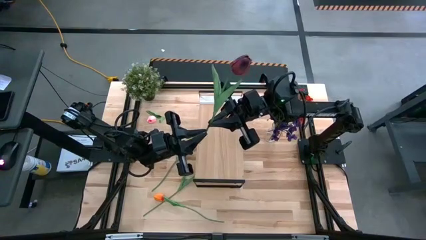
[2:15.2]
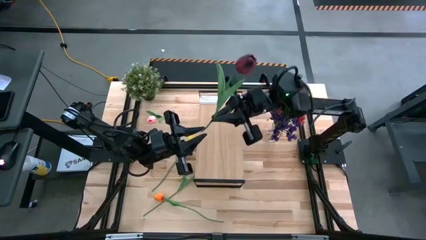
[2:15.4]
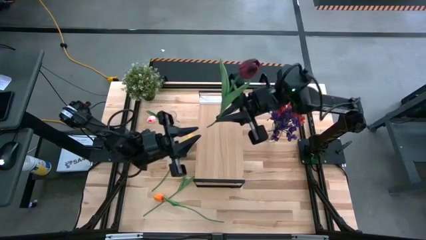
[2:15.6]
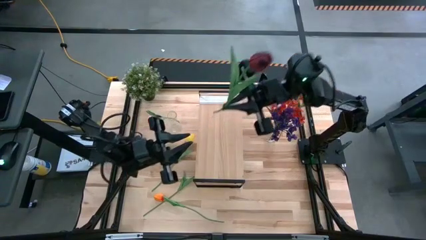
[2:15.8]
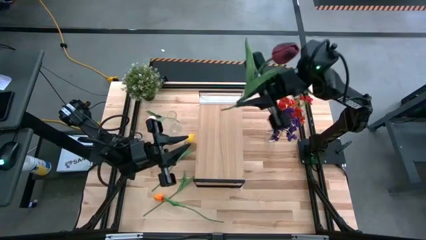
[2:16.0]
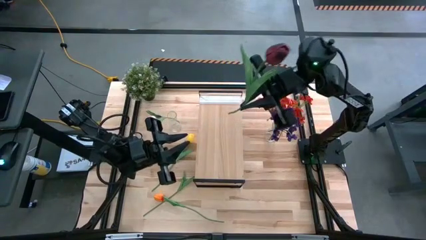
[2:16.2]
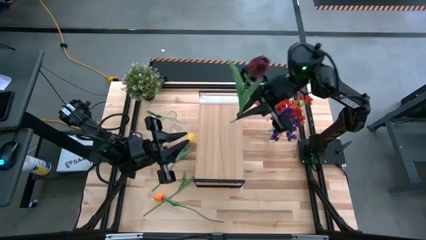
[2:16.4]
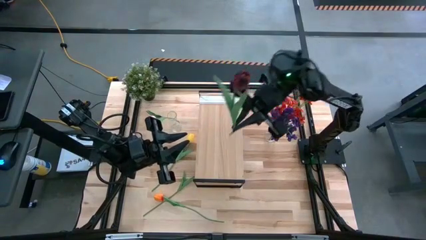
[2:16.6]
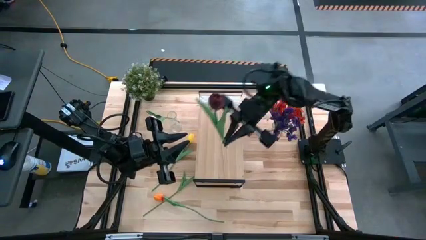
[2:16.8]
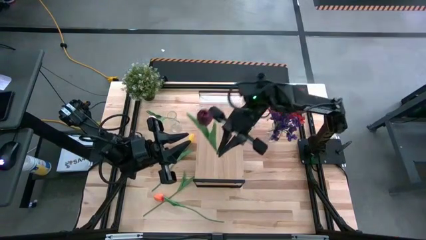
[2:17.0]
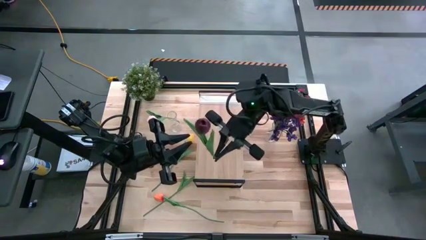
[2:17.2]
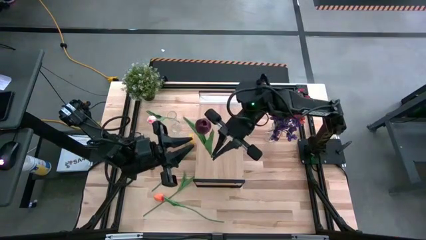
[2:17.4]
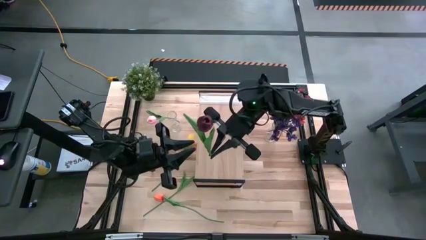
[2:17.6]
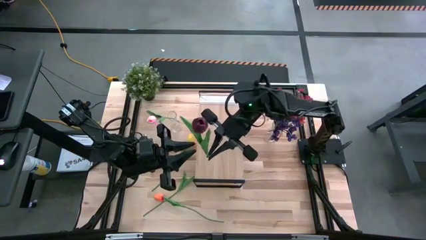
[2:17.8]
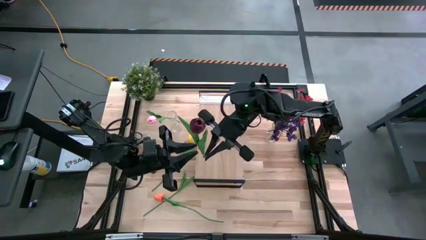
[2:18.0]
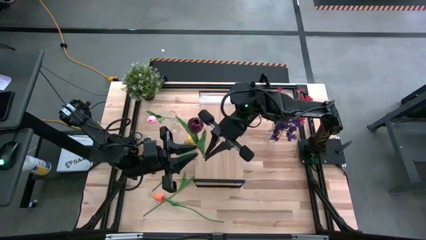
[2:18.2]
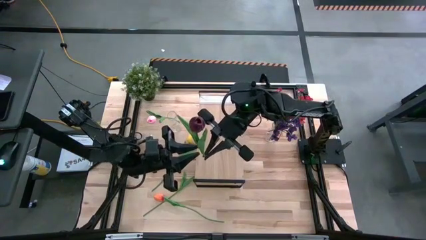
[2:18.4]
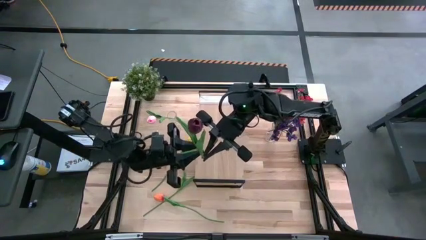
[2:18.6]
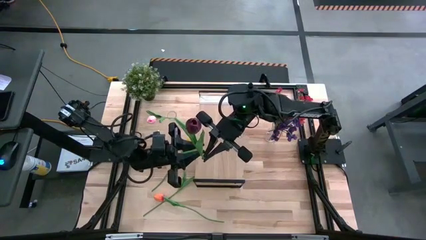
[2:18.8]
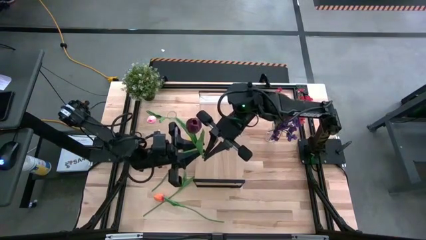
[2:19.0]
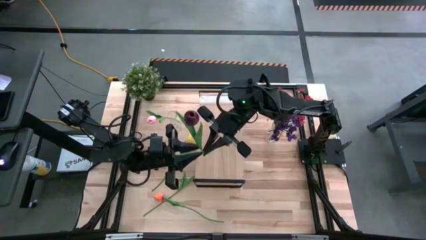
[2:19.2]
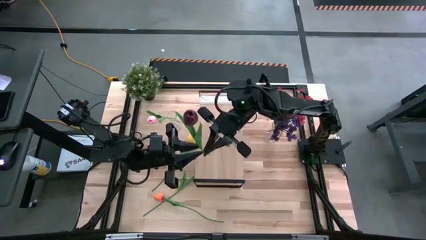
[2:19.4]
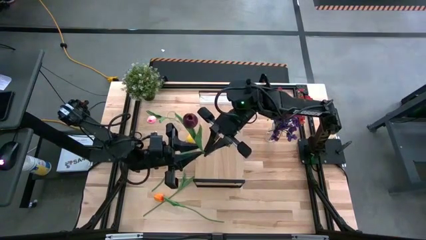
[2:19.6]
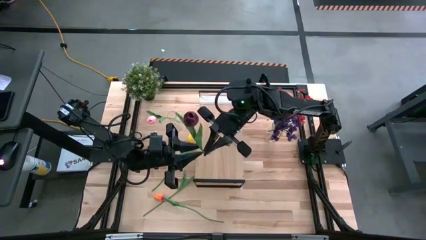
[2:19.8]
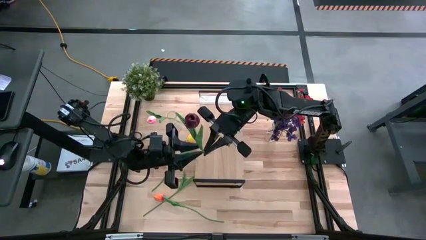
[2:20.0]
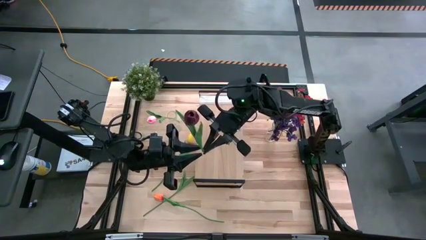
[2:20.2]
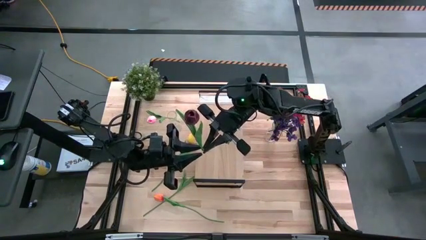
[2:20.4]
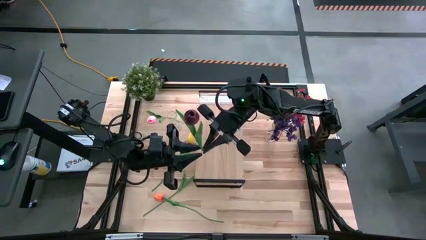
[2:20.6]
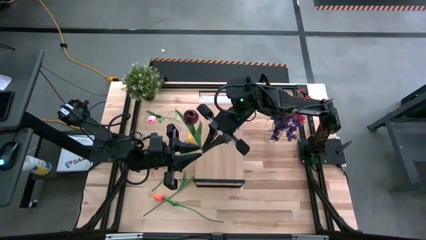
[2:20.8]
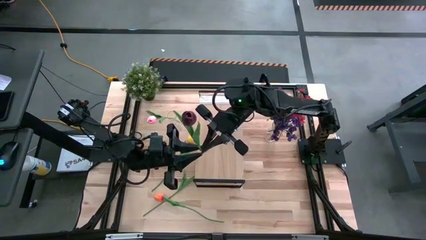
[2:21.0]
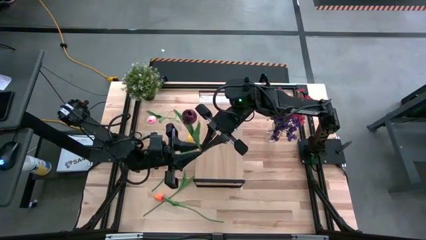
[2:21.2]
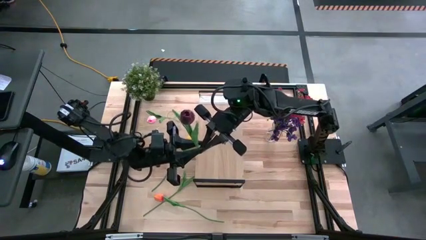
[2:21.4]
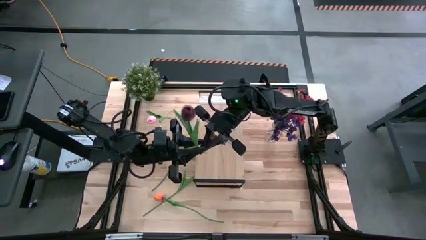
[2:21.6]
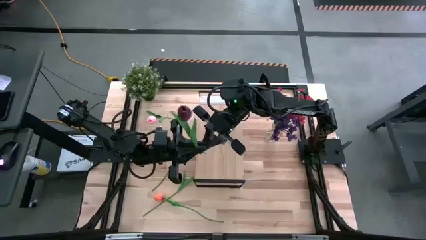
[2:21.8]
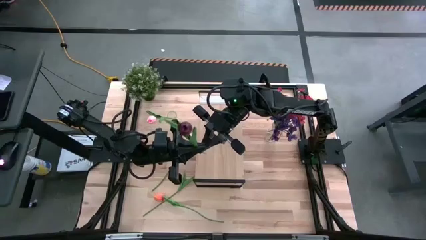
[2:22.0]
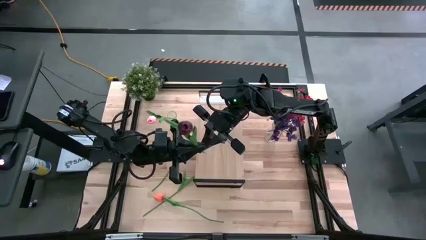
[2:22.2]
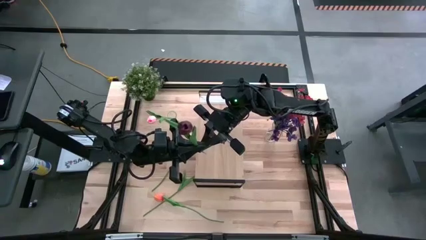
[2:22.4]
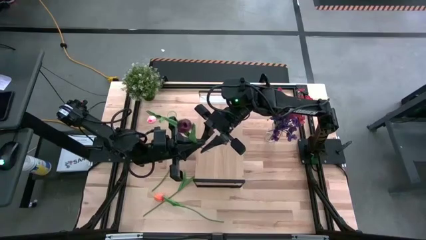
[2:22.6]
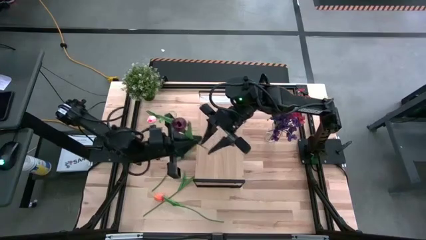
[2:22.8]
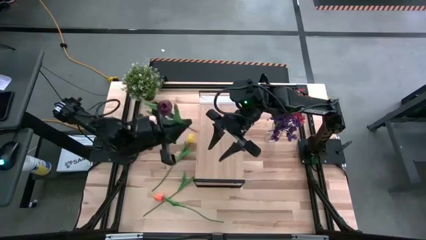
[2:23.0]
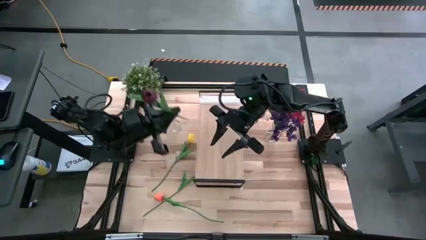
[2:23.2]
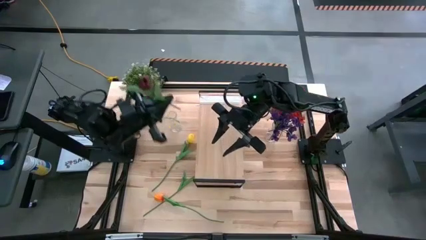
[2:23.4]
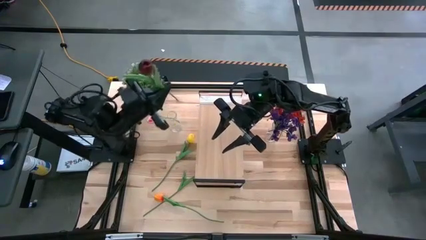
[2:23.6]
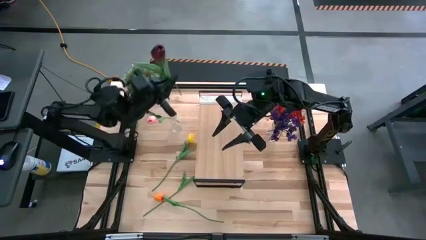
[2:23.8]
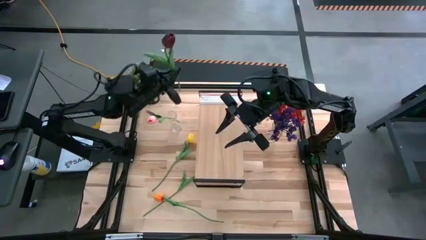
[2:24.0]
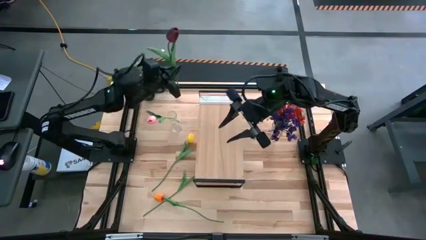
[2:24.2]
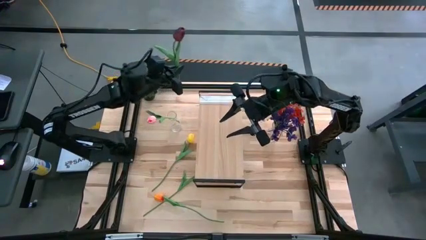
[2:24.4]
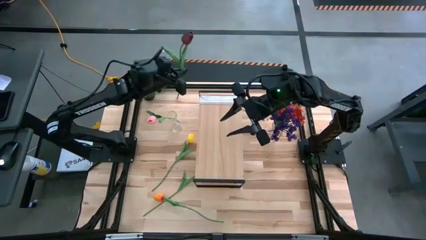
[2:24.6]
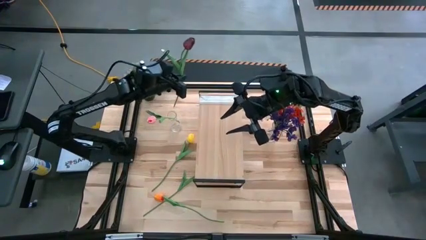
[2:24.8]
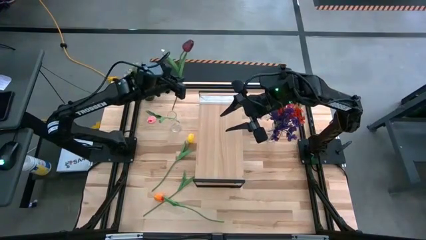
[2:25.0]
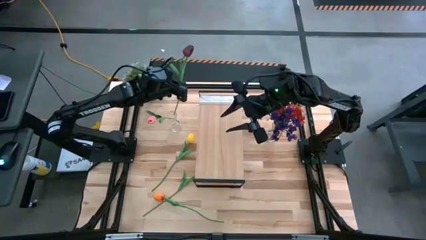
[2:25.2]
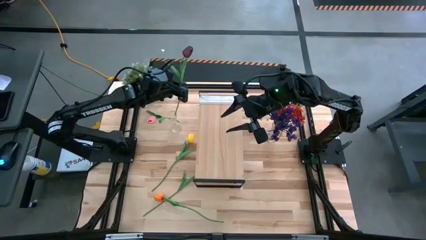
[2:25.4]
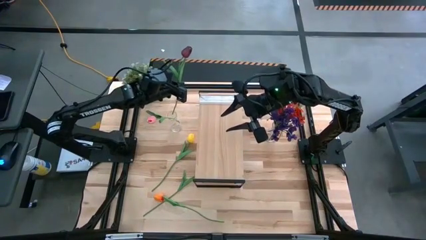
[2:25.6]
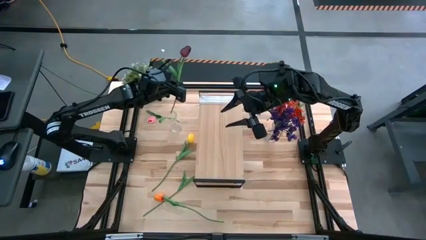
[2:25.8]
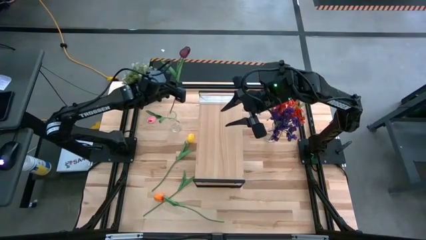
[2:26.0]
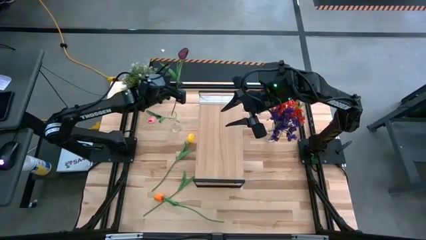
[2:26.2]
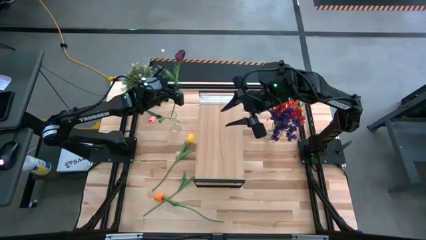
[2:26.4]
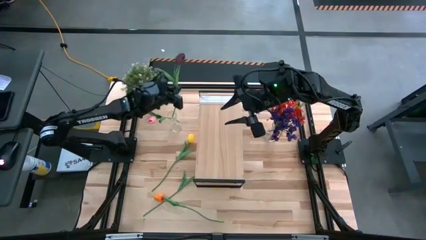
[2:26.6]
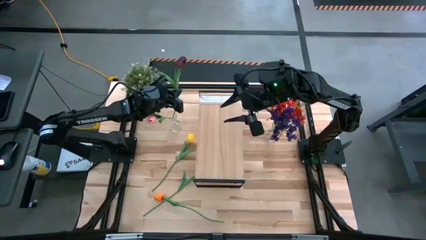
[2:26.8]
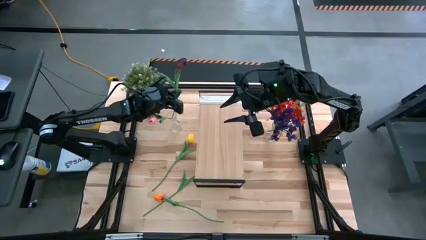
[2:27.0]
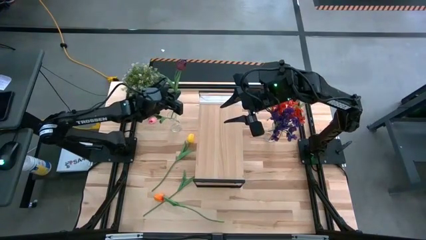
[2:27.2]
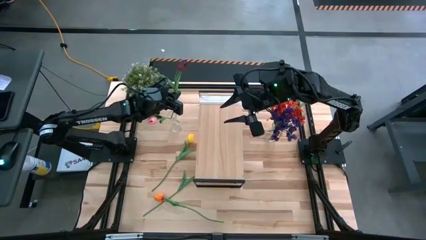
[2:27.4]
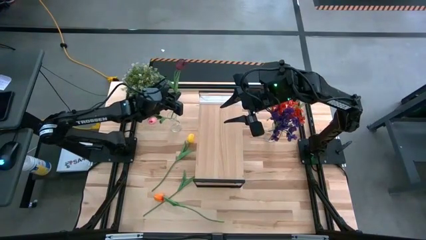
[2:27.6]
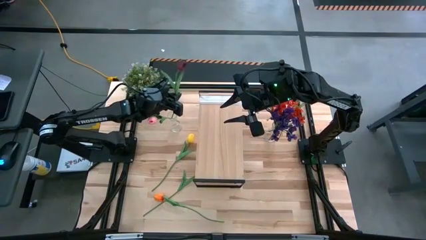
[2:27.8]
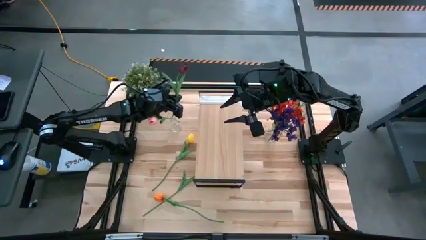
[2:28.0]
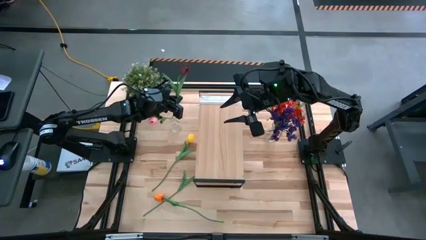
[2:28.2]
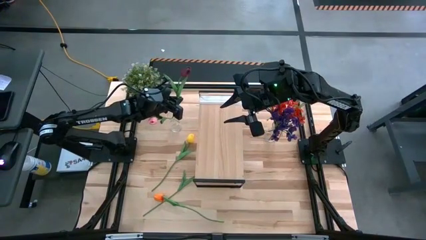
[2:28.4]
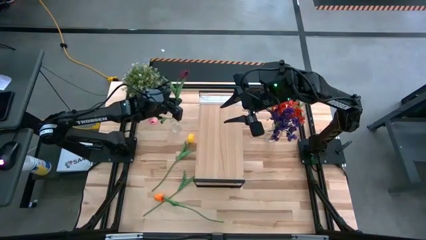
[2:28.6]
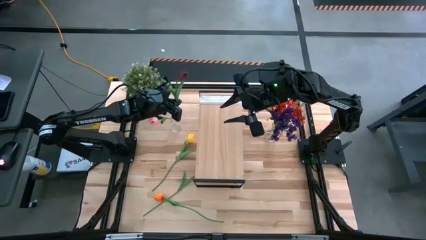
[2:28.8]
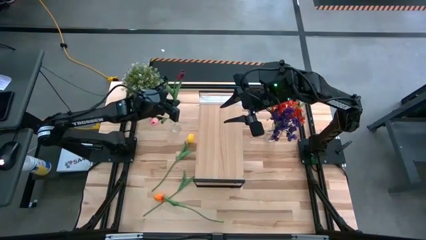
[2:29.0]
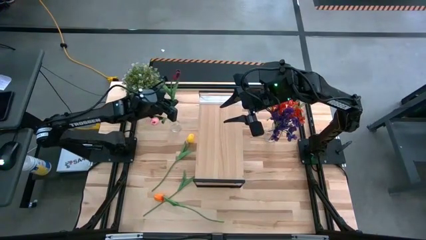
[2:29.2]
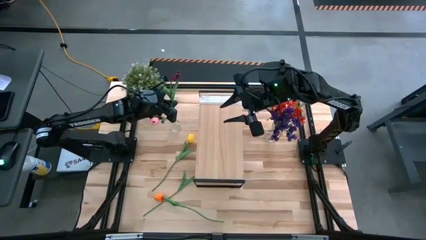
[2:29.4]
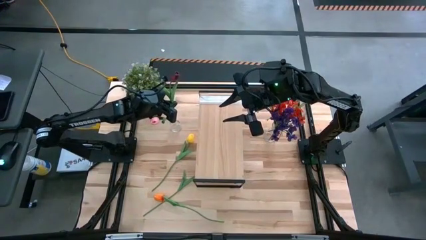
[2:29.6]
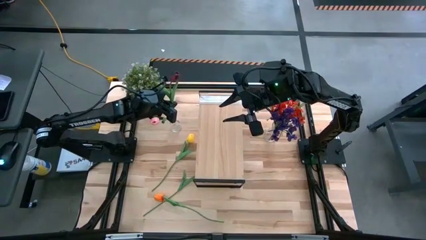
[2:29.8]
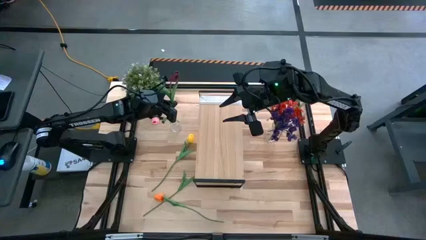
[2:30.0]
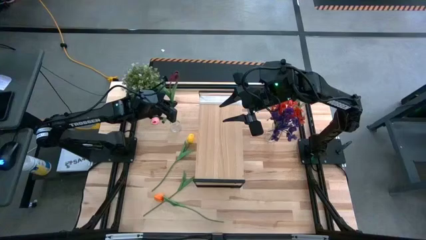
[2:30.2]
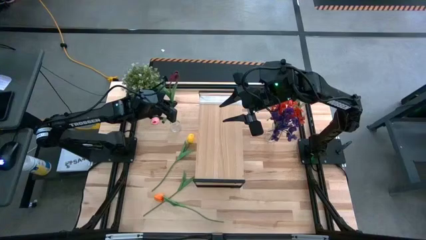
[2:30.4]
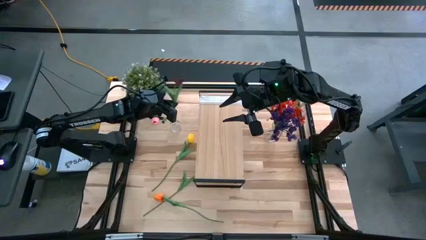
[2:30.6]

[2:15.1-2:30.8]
Task: Pick and place flowers into a vace then onto a shelf
Put the dark red tulip into the left transparent vase
